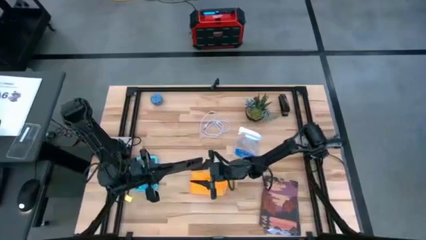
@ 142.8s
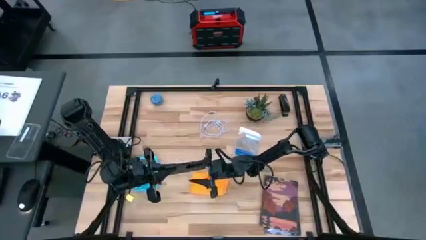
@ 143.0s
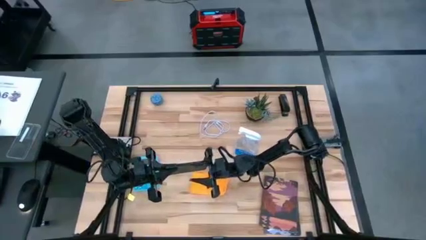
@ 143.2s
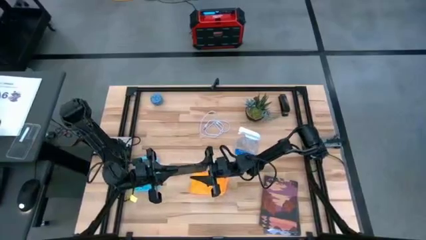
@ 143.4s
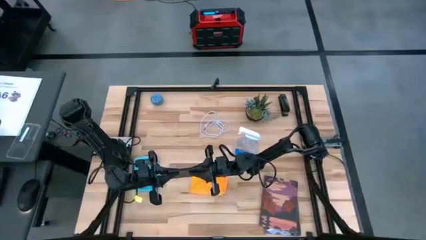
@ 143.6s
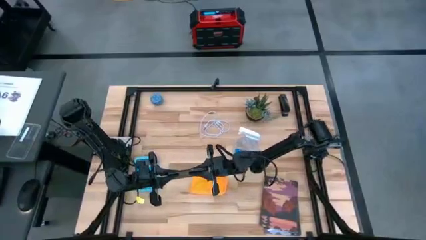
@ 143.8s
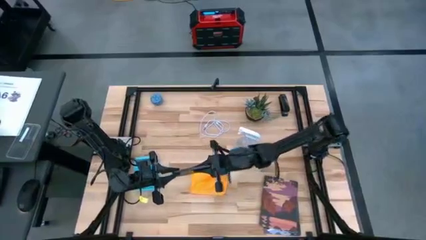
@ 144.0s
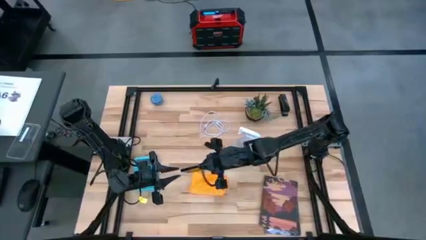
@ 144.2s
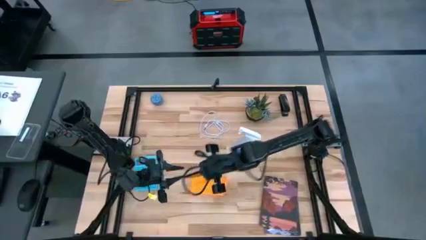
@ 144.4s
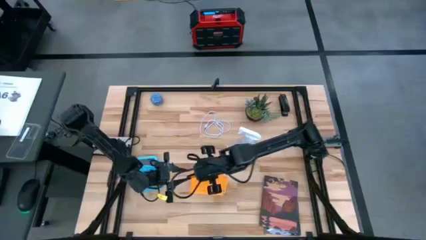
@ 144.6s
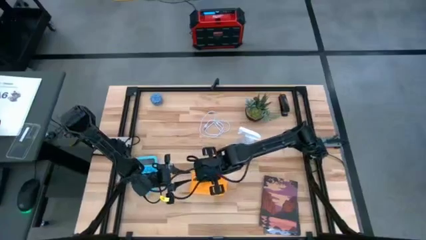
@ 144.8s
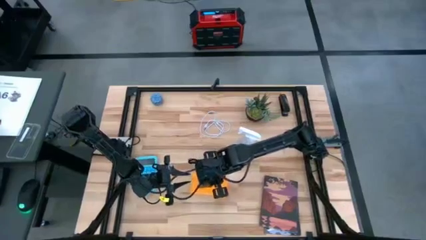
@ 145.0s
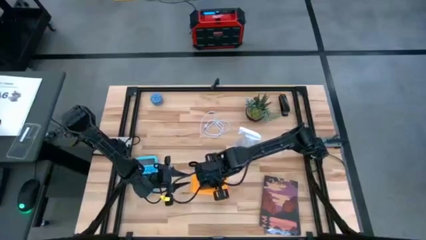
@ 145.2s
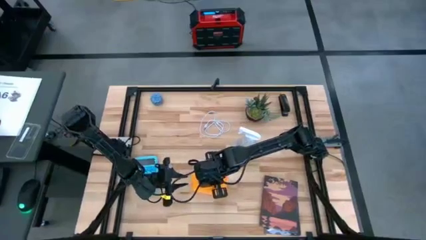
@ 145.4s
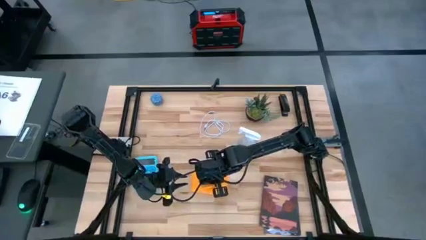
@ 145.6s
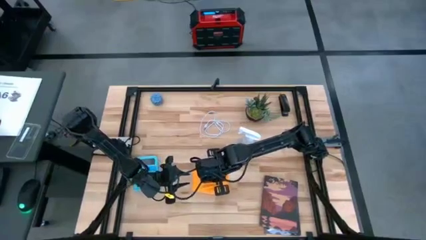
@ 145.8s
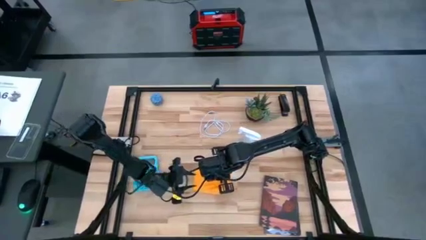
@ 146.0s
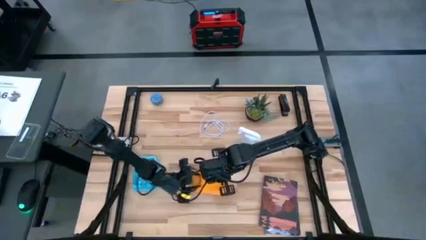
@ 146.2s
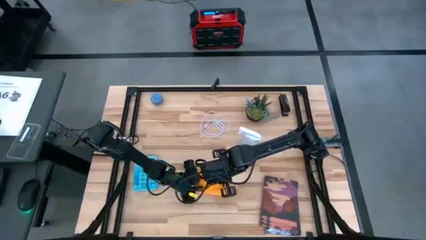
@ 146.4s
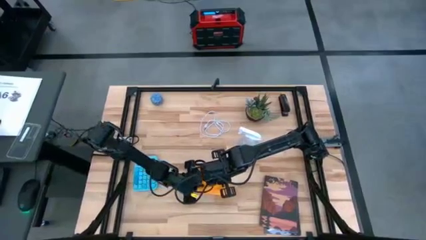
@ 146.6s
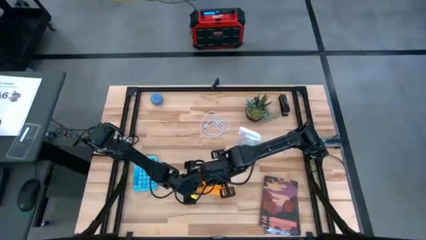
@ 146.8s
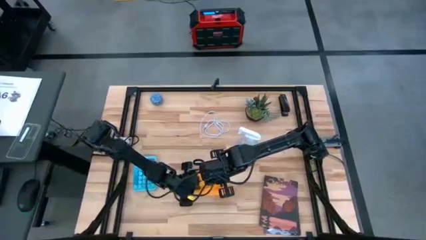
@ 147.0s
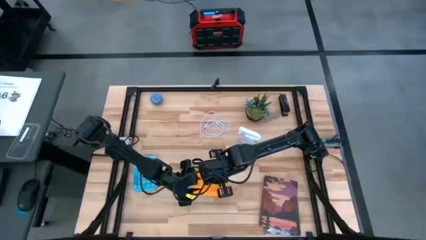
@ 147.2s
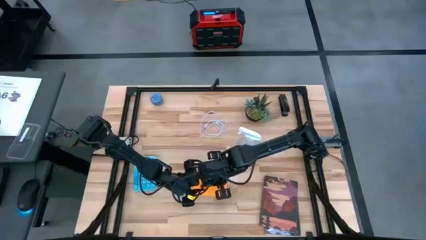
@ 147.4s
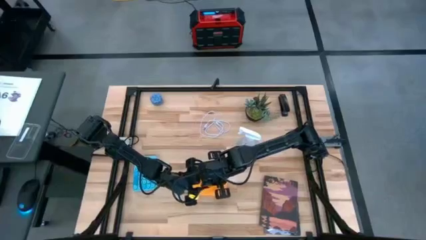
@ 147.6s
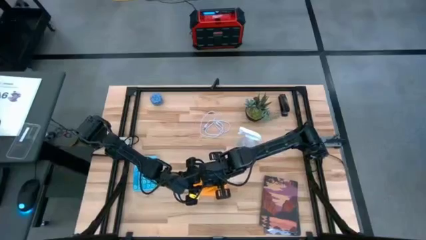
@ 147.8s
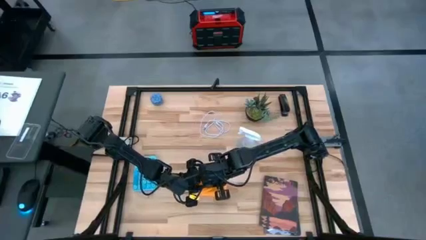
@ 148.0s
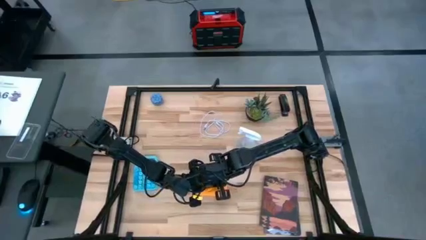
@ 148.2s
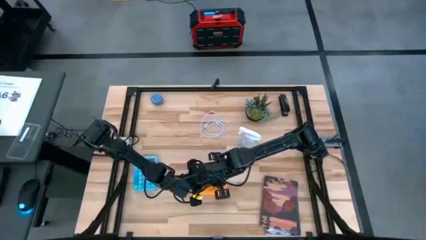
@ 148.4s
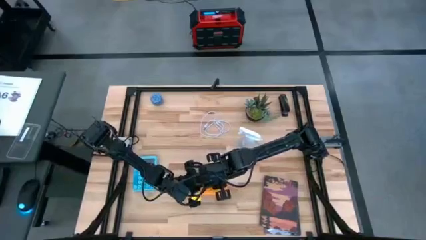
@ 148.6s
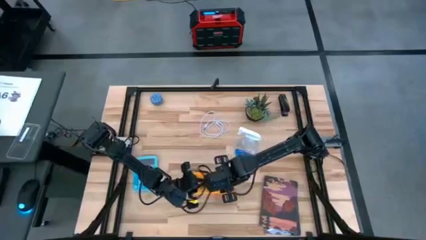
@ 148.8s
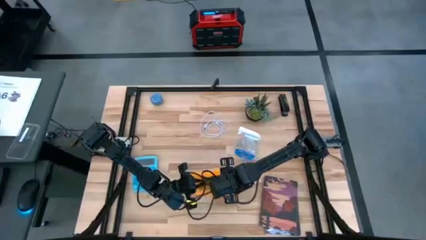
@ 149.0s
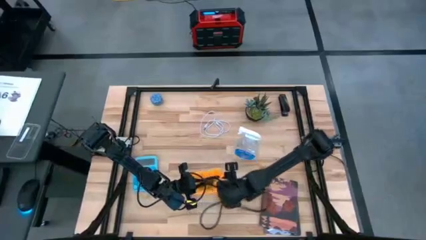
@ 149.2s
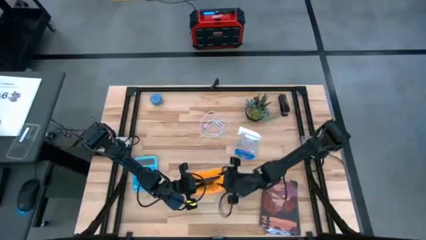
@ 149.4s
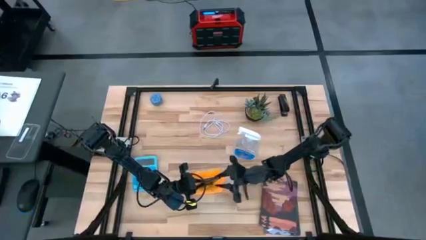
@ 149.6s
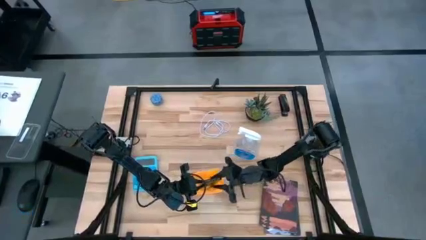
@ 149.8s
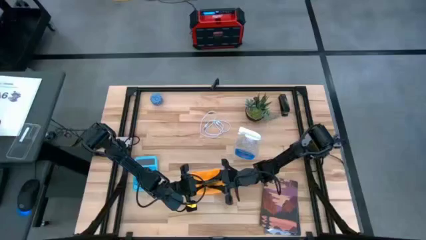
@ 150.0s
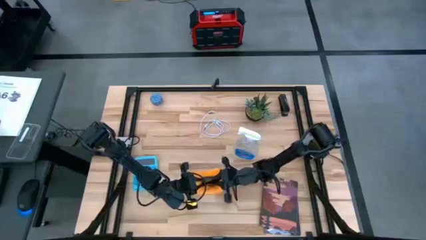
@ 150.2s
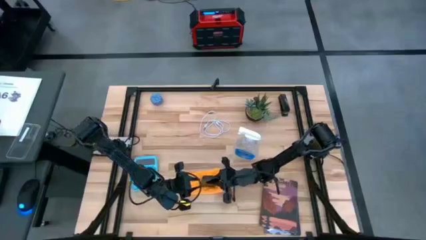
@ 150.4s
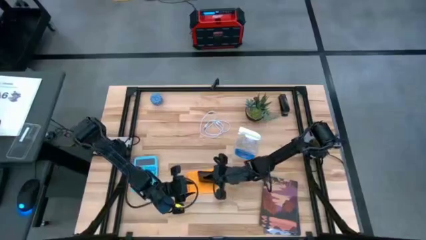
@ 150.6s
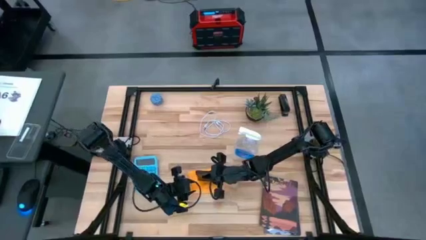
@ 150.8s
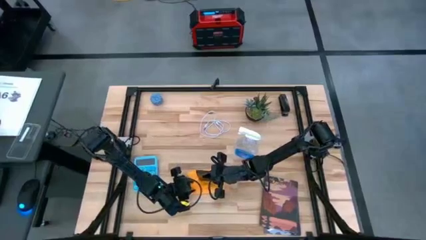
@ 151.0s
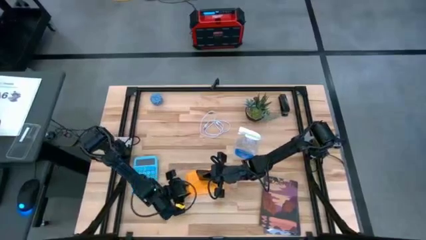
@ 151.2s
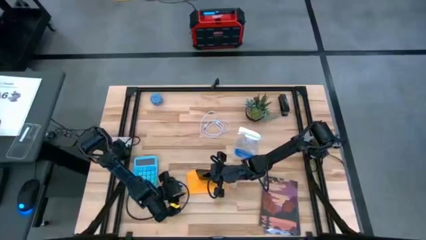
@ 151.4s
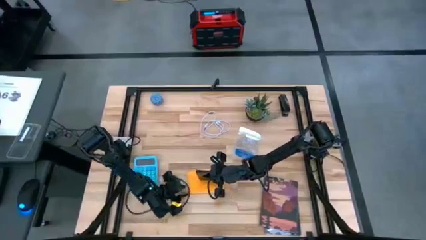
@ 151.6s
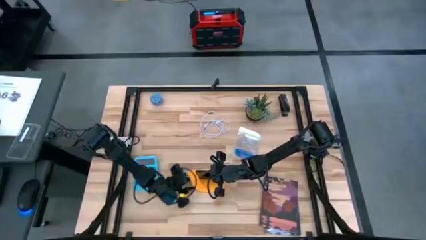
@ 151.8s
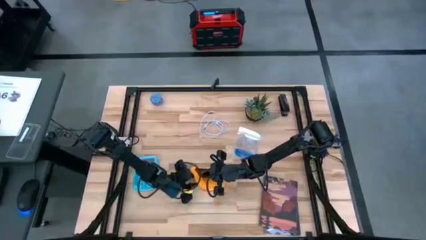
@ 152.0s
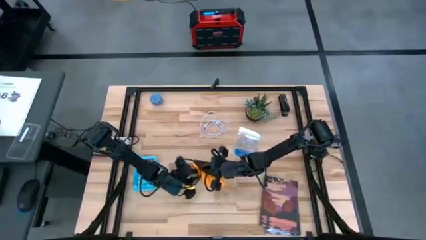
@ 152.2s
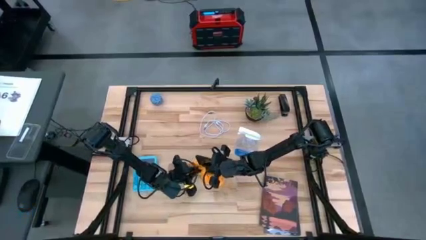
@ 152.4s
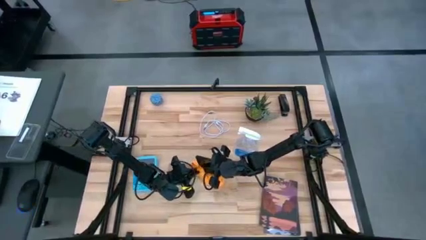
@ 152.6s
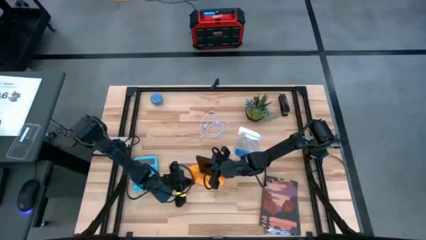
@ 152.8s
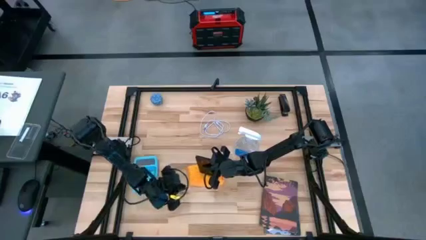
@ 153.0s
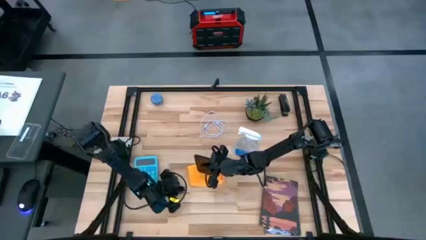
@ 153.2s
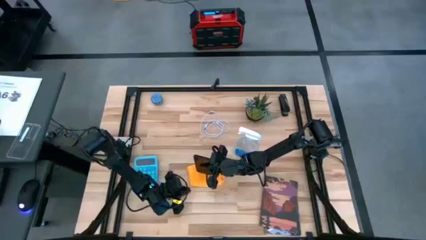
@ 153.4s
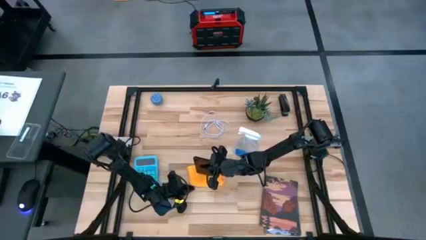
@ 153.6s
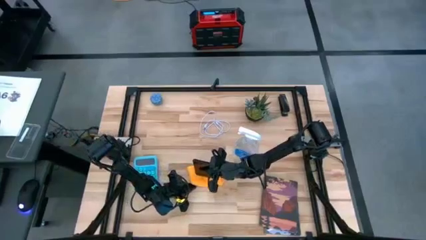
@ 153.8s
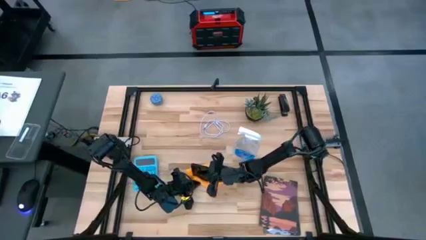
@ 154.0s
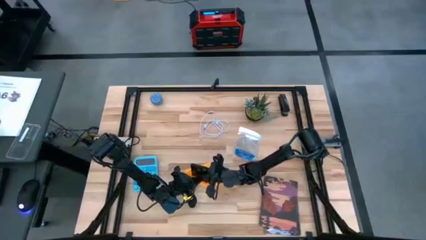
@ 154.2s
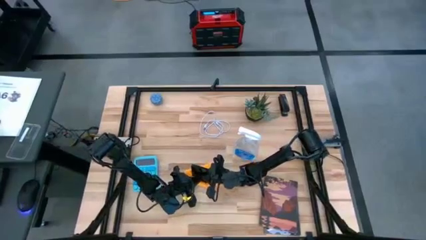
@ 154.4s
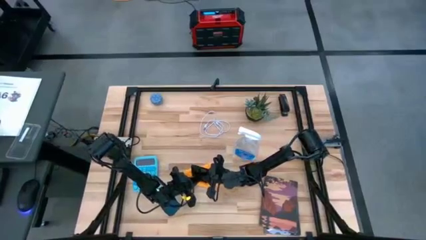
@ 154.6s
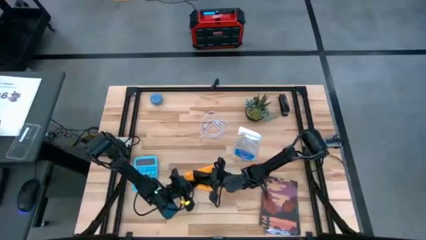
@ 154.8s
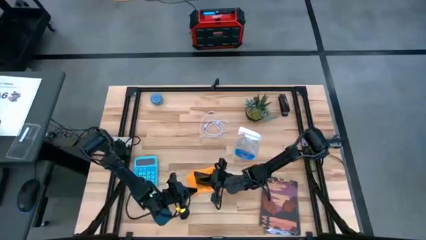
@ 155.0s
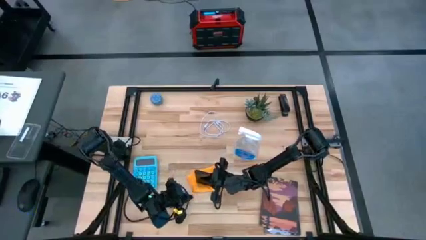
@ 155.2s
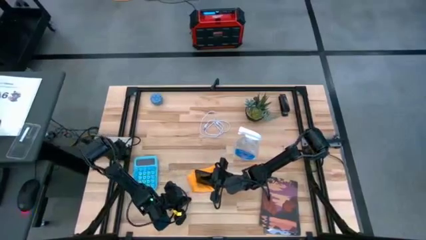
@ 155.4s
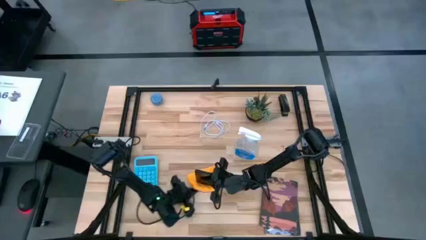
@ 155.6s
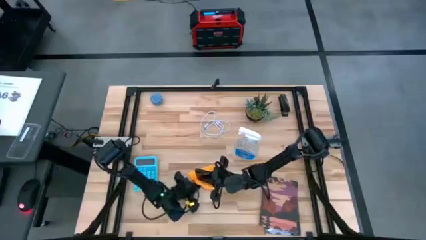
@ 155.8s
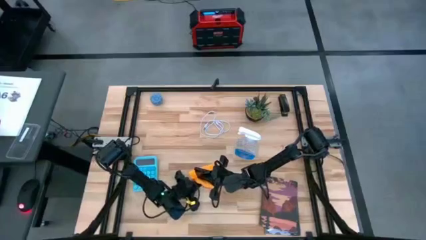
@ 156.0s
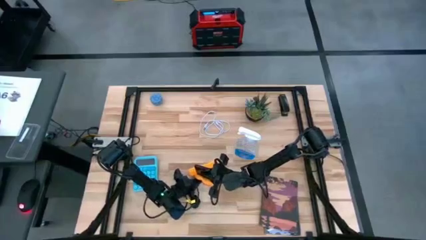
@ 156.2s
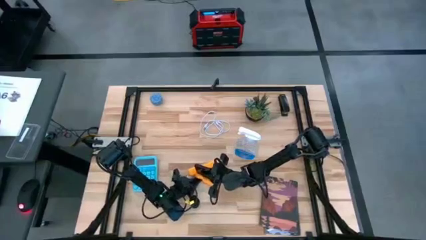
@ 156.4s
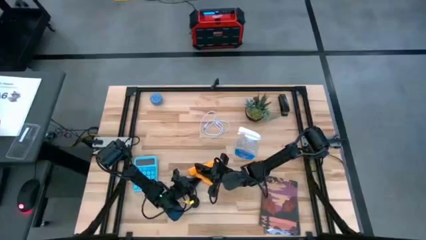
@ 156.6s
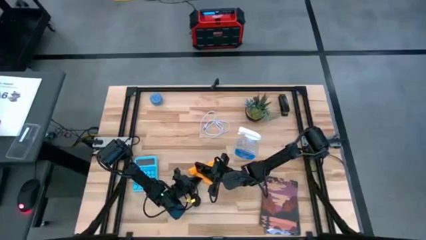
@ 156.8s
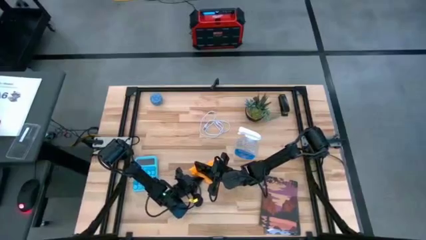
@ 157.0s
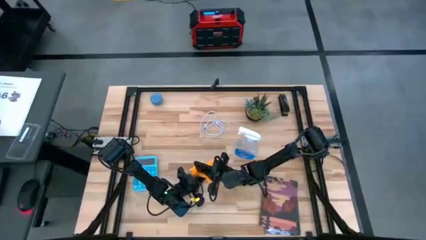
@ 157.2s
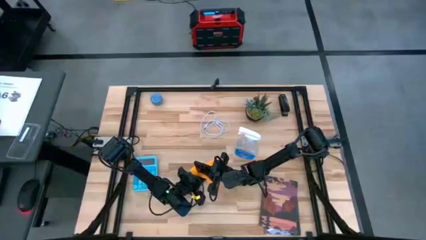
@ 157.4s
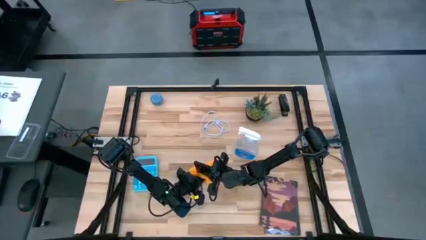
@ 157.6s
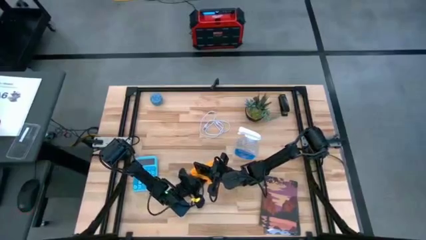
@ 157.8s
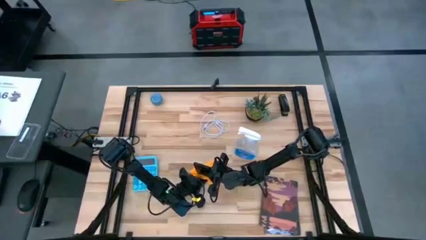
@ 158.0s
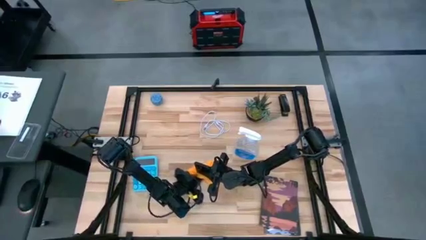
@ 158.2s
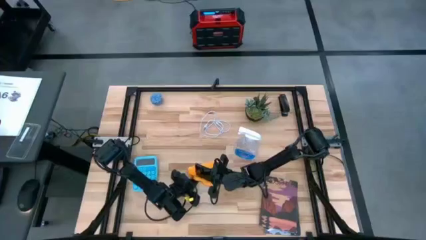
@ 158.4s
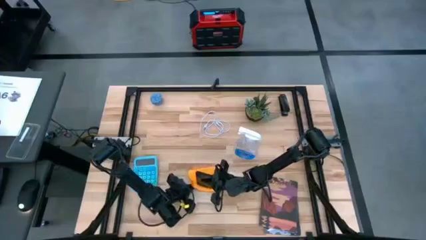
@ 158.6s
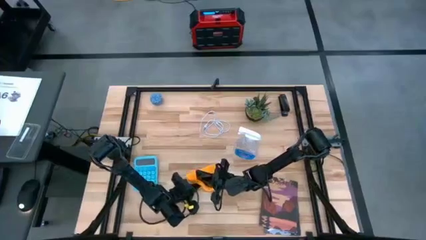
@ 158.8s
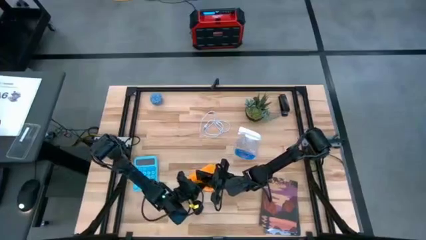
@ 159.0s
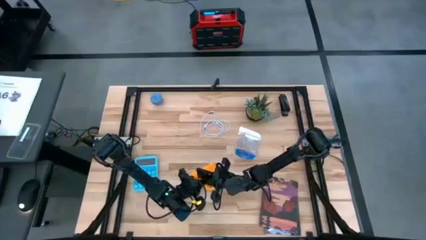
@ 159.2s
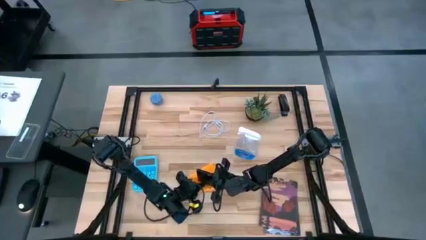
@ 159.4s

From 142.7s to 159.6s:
Task: Apply microfiber cloth
Wipe the black cellphone using microfiber cloth

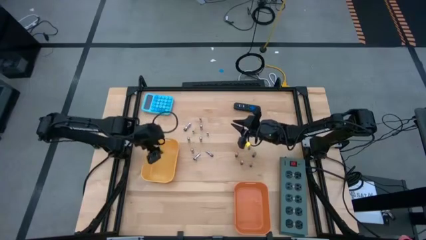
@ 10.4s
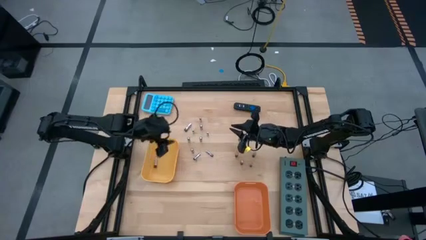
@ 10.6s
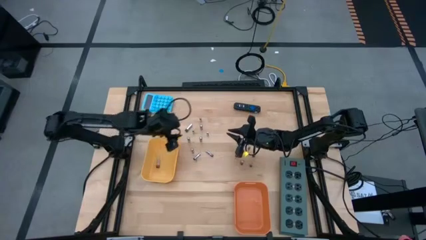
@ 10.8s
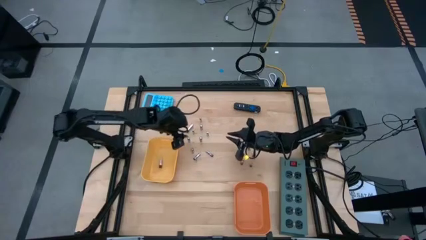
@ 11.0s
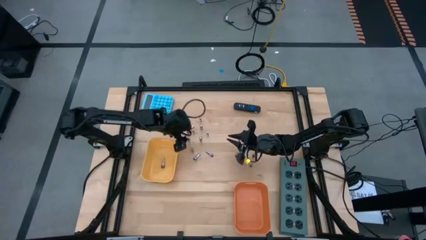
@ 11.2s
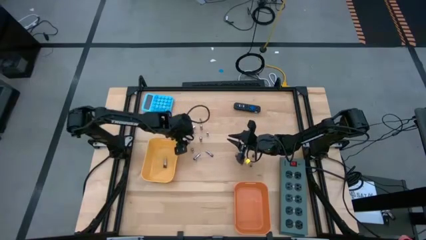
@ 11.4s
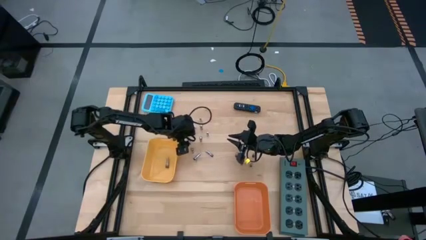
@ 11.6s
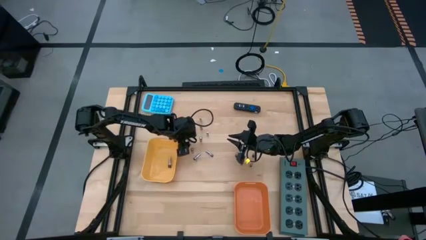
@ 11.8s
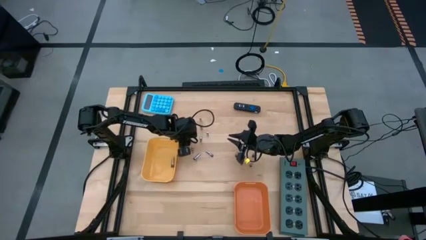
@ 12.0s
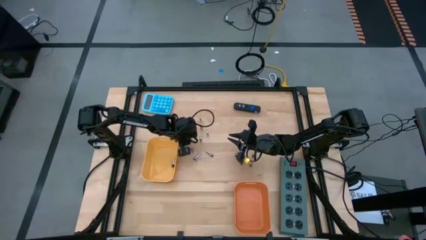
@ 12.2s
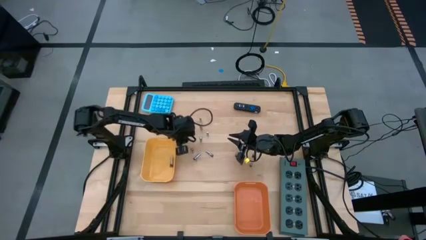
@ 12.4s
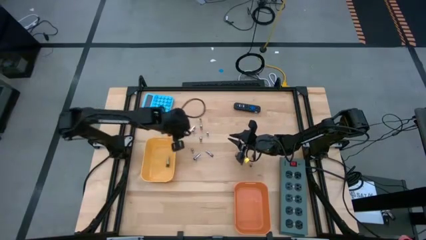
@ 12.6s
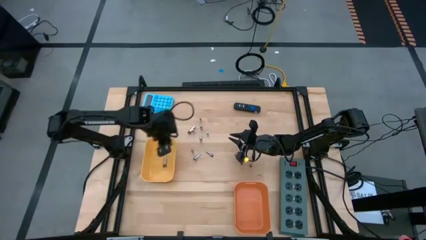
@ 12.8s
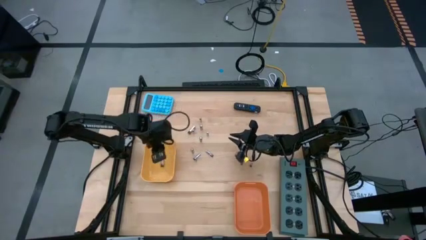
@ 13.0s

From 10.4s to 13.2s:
Task: Sort batteries
Put the silver battery into the yellow bin
